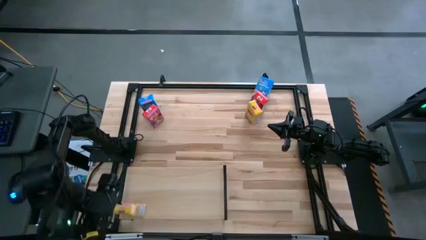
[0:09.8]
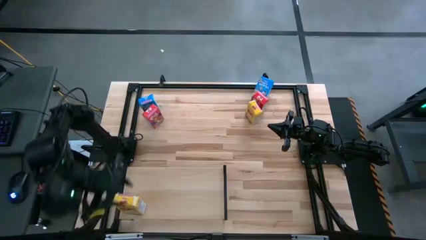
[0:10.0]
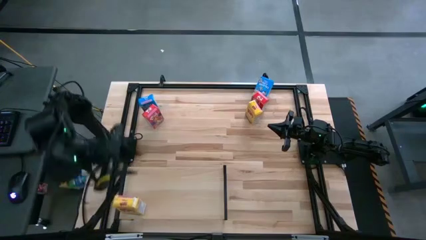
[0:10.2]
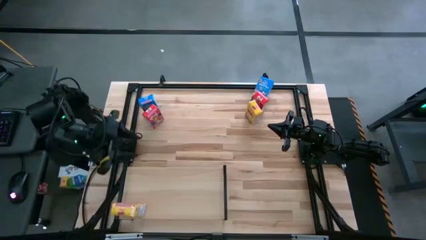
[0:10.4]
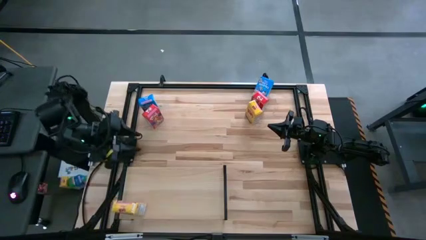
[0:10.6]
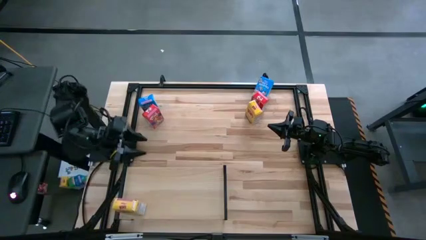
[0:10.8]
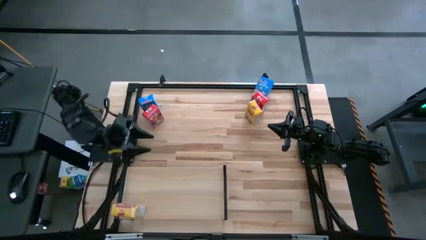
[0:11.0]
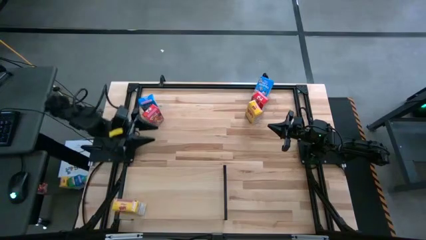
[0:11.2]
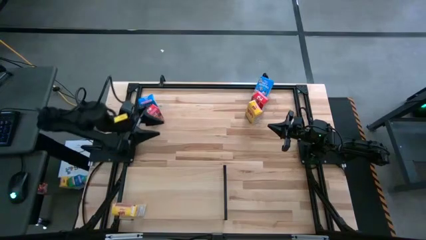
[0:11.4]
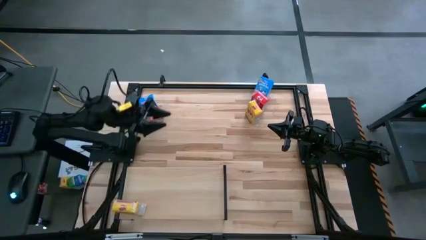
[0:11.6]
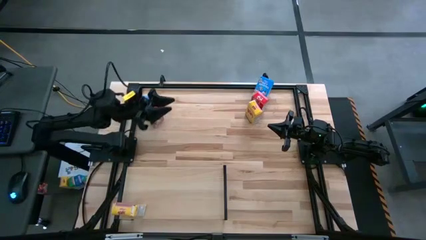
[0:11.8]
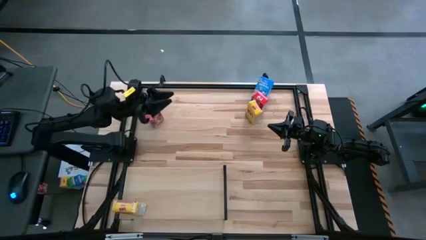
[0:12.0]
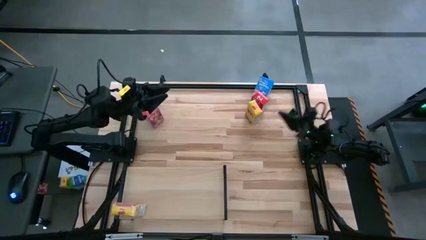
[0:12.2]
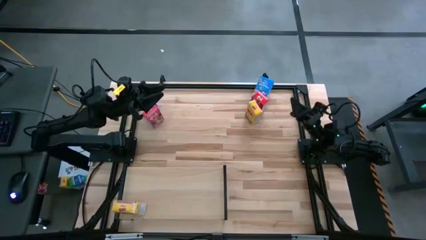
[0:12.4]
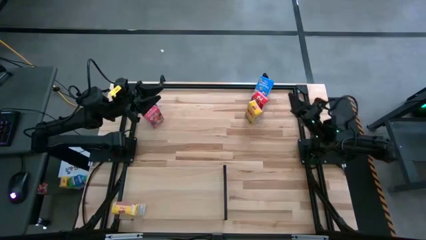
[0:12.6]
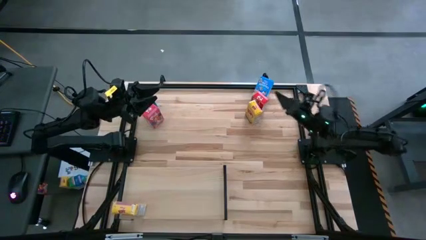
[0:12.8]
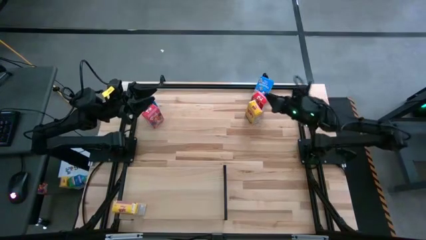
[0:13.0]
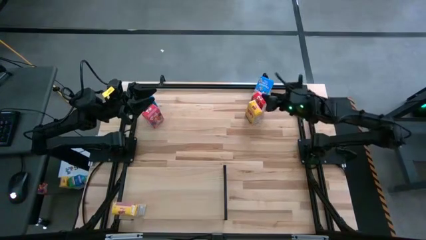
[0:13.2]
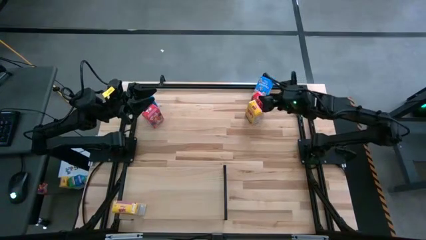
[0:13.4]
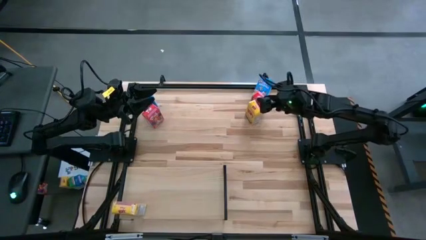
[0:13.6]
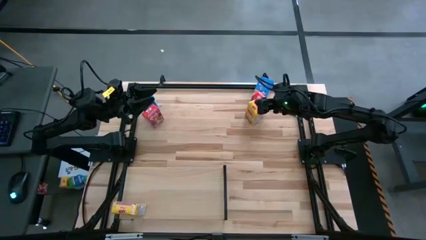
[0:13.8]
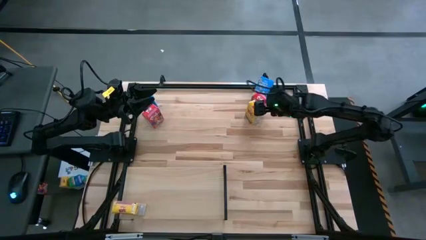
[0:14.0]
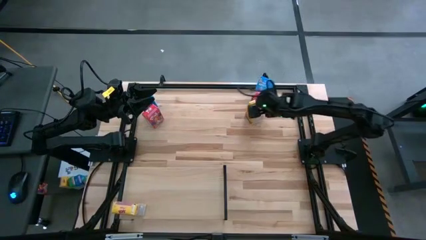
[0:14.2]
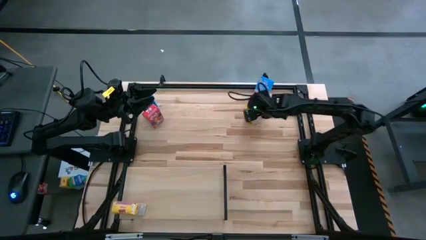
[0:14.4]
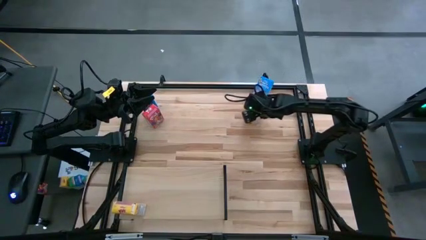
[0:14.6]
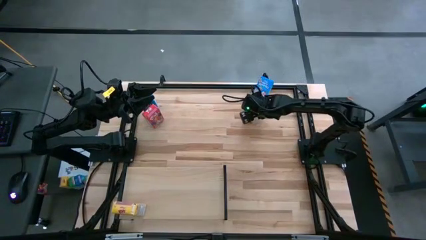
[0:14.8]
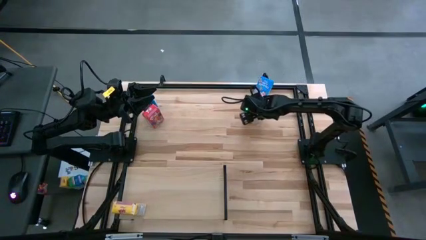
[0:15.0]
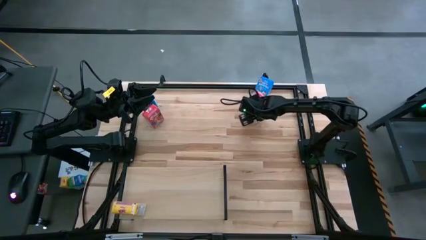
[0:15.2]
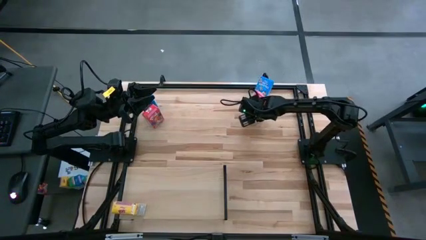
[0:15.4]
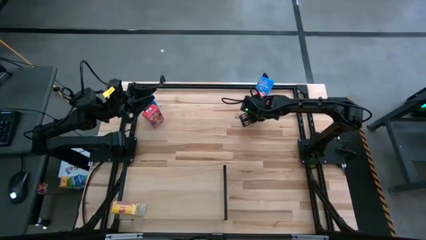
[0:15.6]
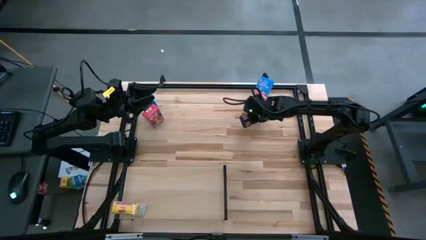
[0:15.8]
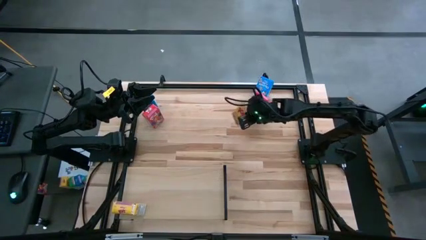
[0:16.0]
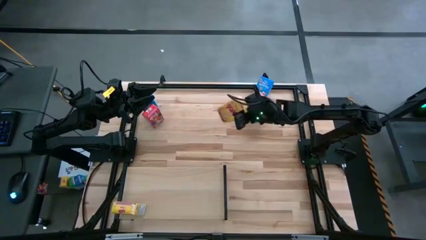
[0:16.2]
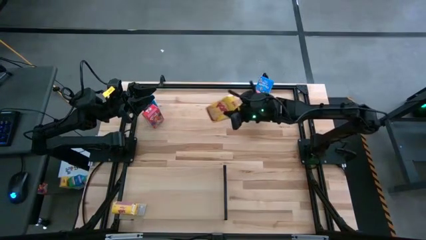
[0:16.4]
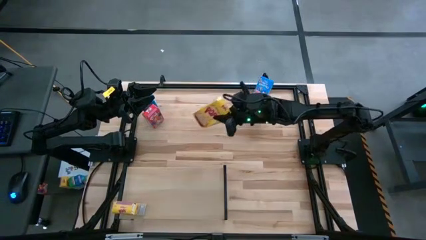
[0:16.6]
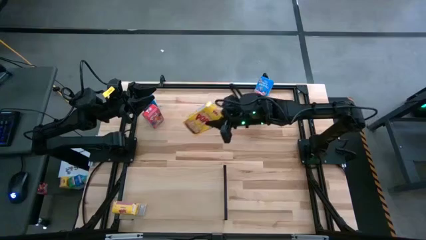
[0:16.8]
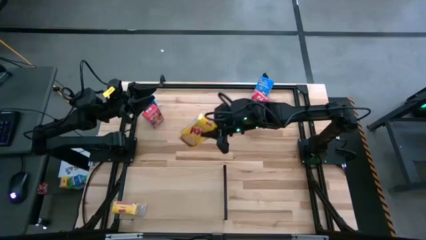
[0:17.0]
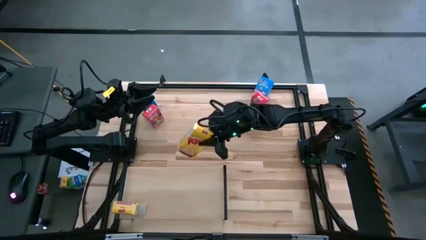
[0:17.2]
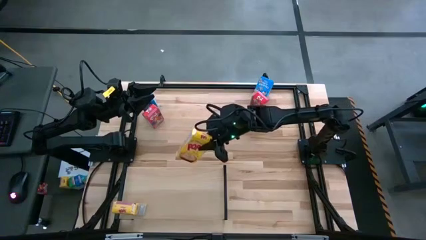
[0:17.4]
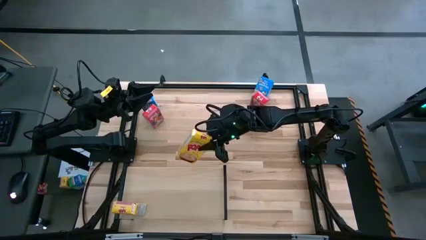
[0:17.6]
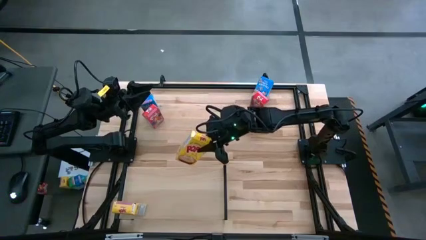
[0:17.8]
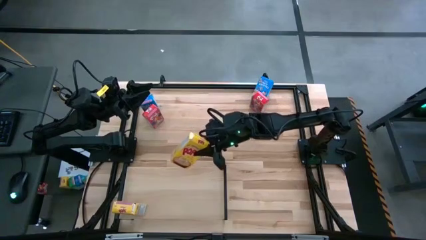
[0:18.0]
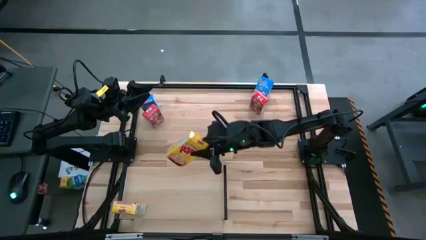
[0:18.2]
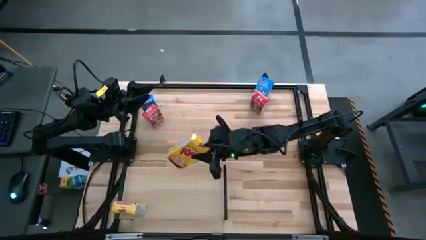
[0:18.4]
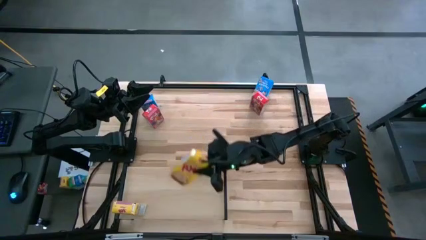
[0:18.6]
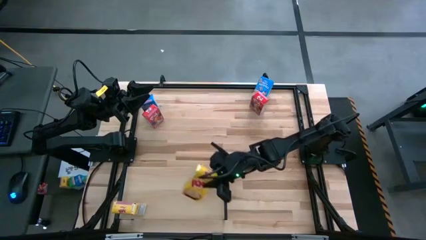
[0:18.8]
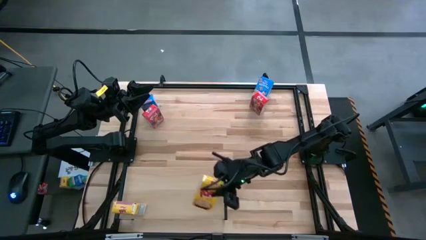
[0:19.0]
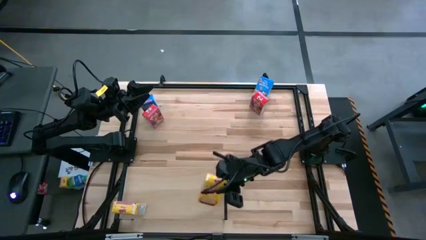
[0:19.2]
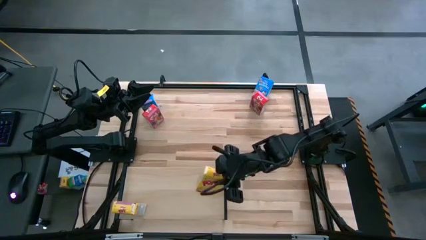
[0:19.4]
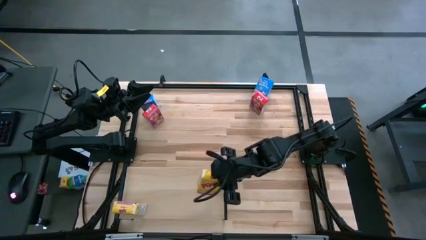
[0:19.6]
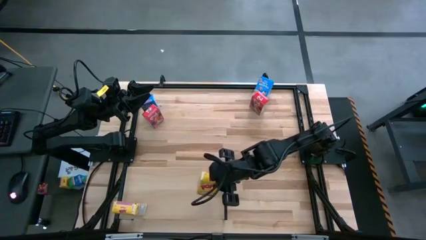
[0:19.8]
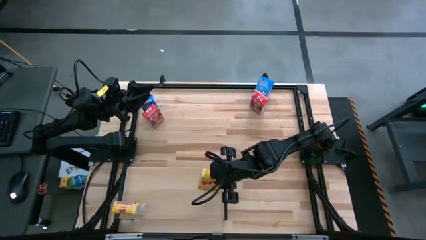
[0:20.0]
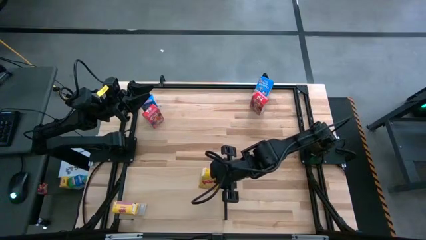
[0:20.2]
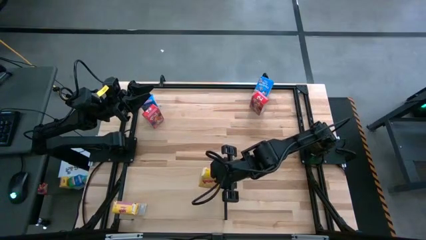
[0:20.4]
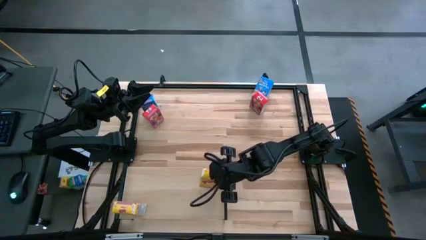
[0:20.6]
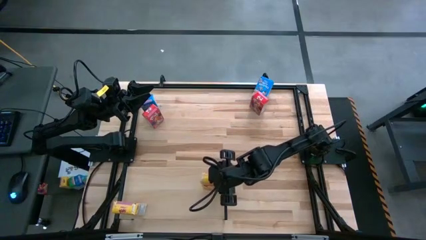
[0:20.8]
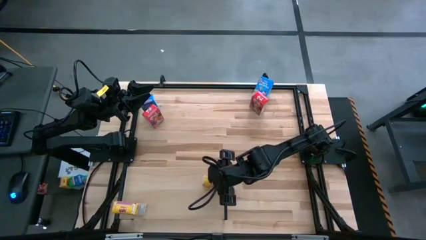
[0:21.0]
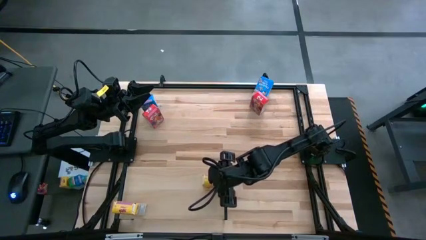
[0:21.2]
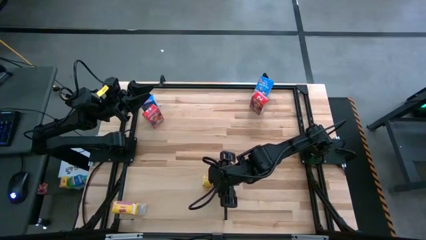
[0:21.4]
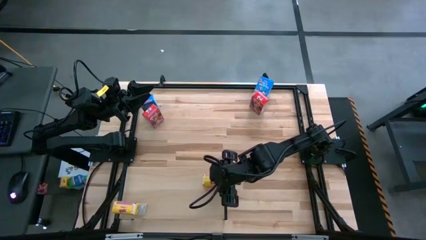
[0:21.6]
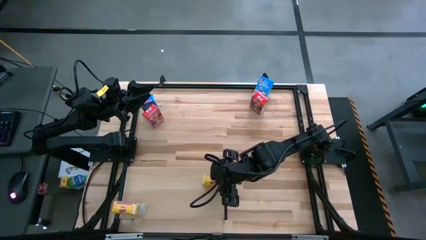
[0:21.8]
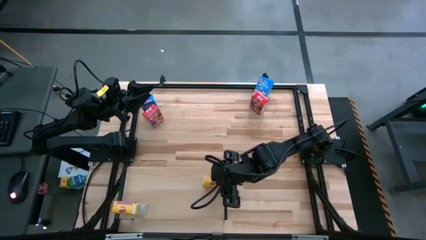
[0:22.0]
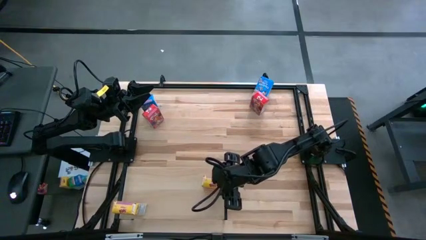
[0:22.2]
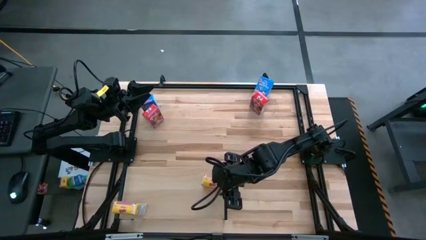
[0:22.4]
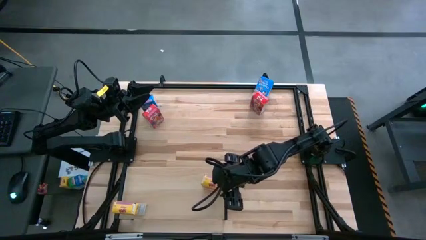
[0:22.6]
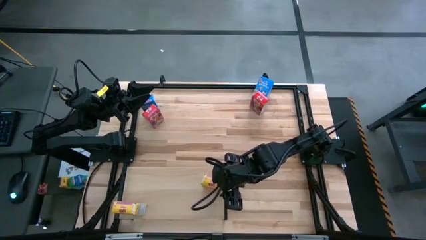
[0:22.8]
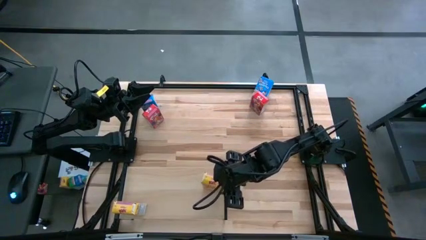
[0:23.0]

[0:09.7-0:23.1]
Task: Stack cereal on shelf
Put the yellow cereal box on the shelf

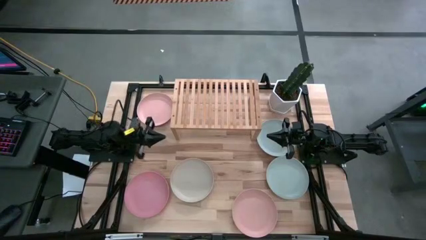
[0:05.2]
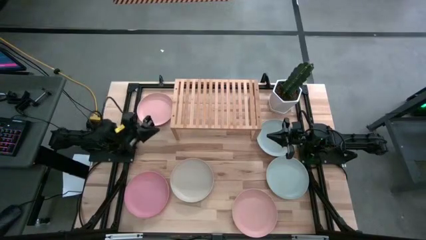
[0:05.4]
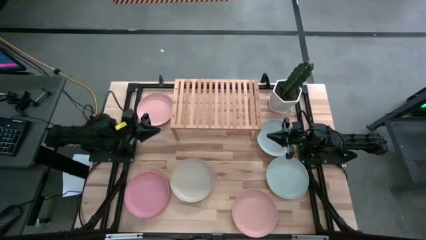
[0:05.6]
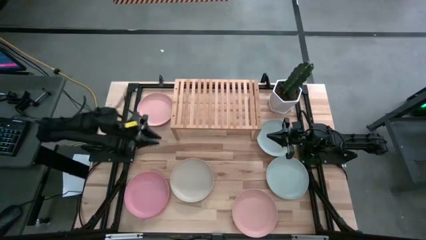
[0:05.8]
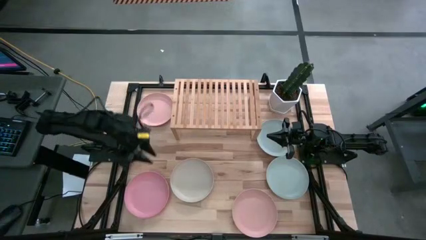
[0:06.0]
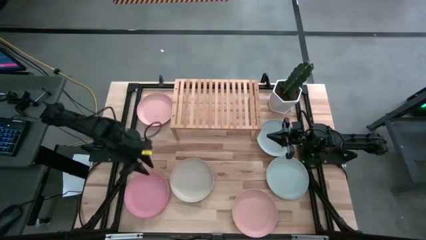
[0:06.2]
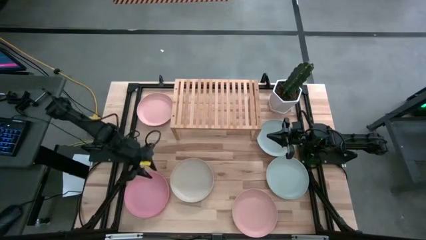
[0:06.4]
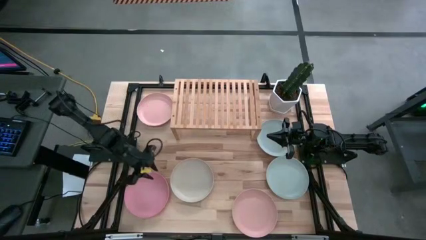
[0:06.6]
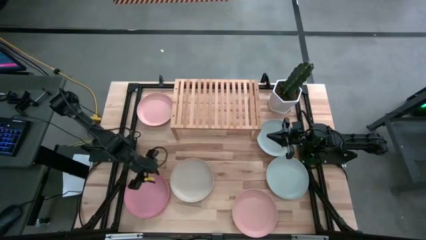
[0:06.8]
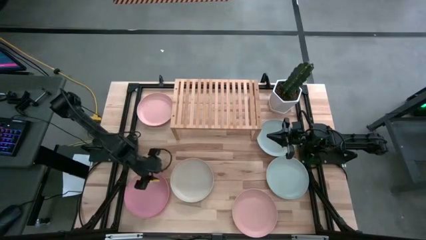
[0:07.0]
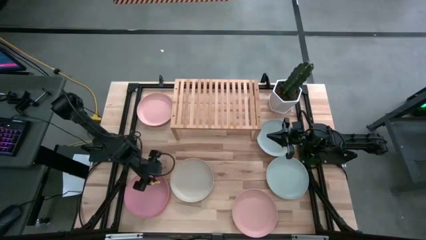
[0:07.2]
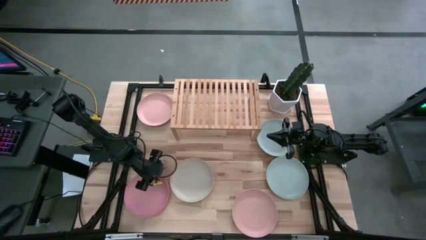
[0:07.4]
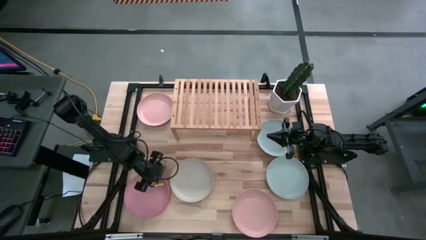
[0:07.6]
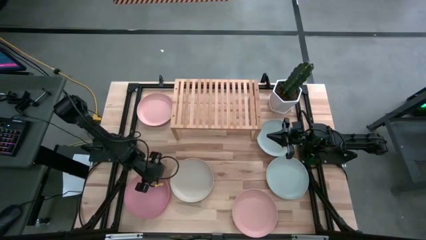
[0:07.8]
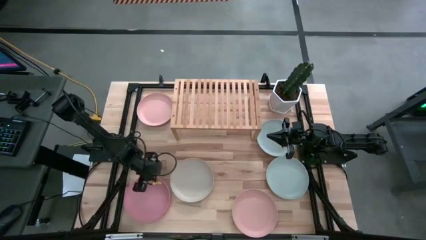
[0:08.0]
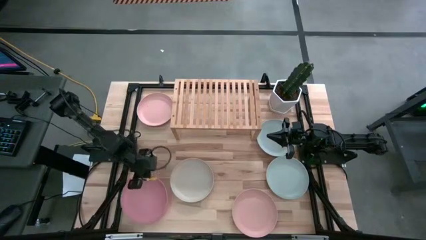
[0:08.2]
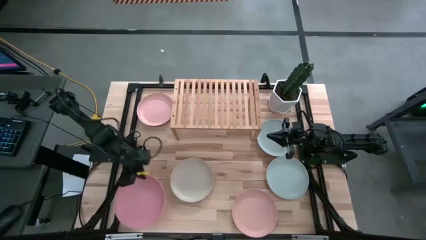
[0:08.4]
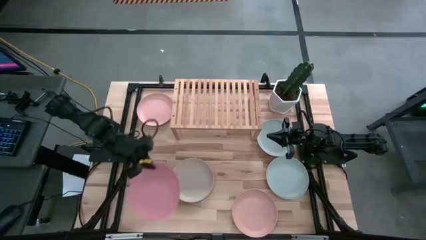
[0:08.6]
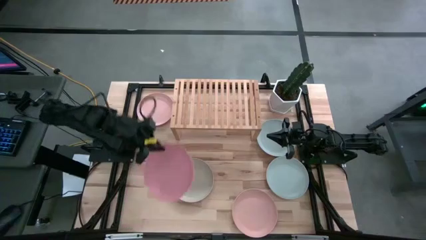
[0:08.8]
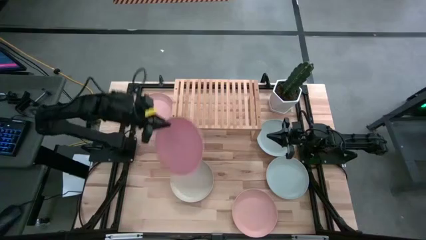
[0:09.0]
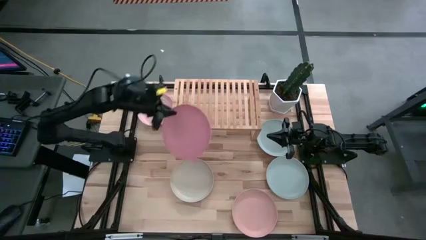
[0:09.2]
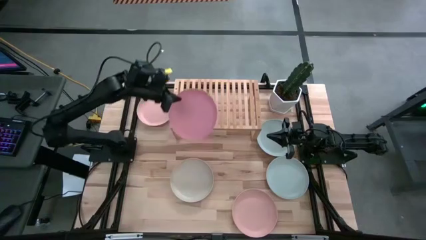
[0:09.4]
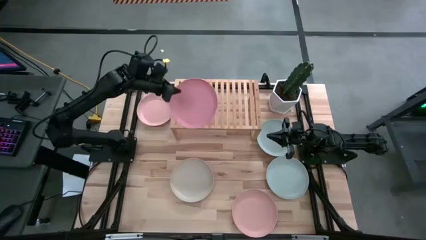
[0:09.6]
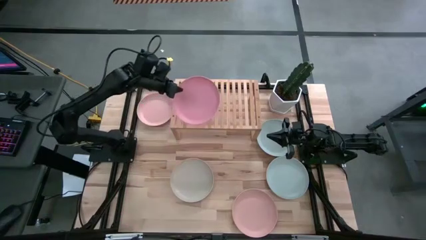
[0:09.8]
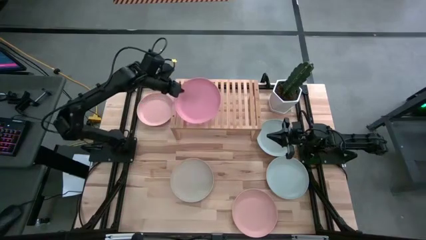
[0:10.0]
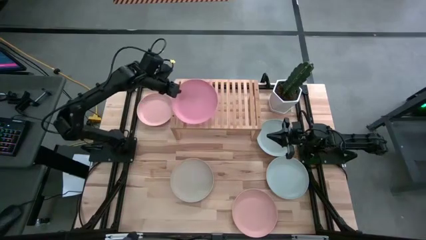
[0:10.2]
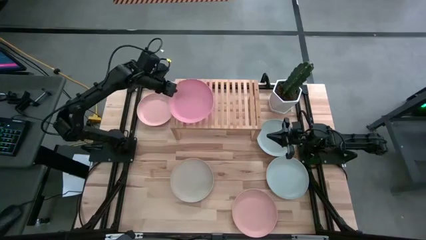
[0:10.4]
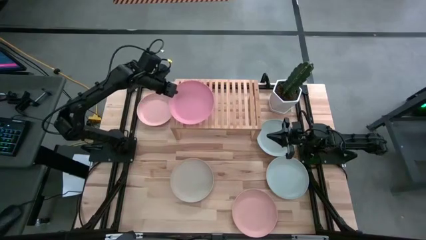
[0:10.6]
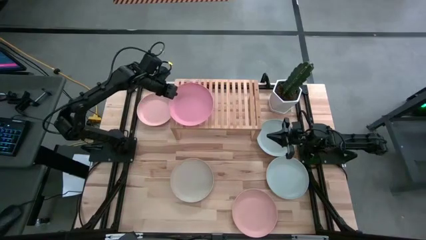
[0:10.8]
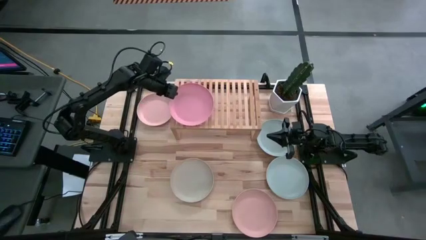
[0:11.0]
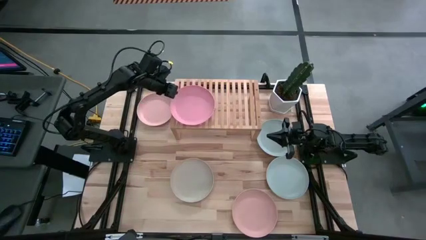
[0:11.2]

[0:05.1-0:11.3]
Task: Place and stack plates onto a shelf
Put the bottom left pink plate on the shelf
